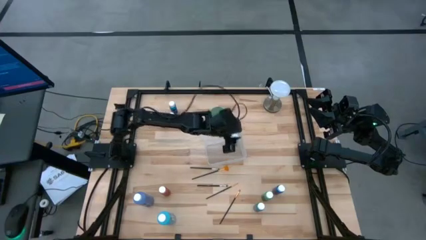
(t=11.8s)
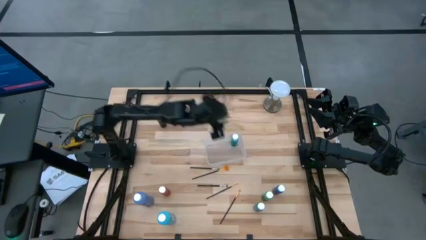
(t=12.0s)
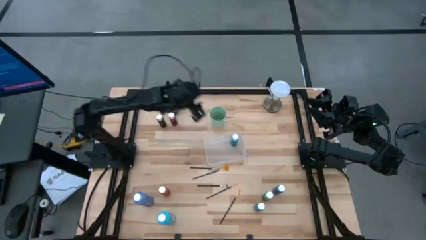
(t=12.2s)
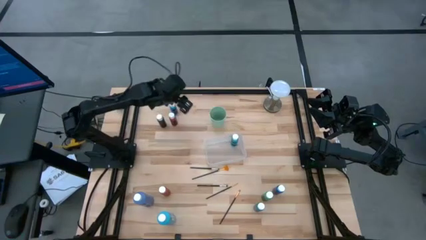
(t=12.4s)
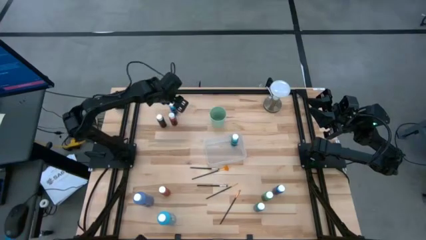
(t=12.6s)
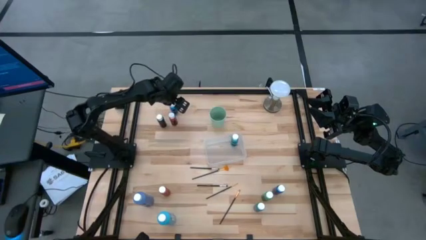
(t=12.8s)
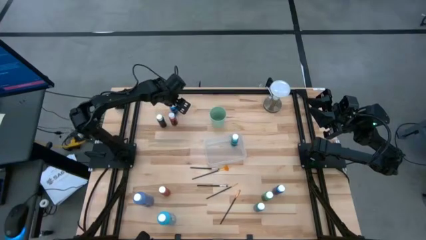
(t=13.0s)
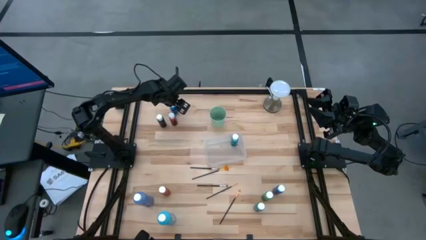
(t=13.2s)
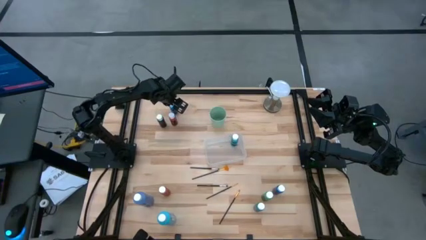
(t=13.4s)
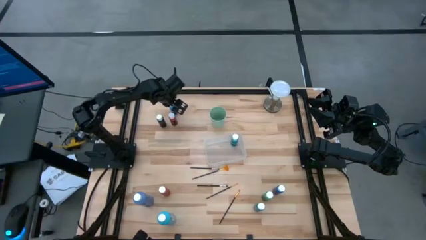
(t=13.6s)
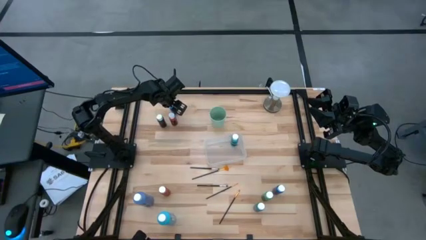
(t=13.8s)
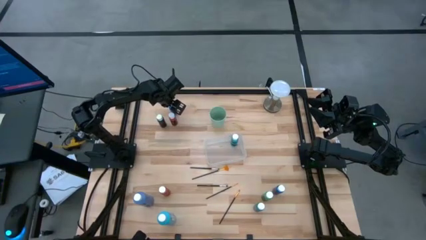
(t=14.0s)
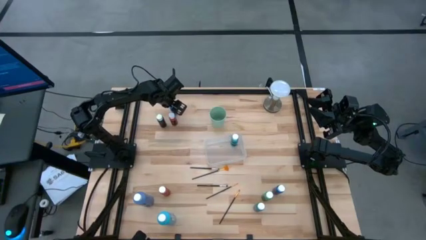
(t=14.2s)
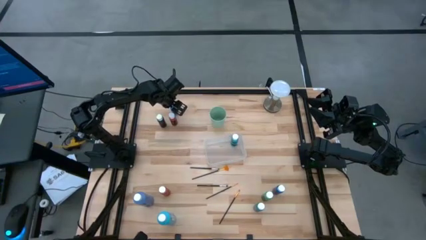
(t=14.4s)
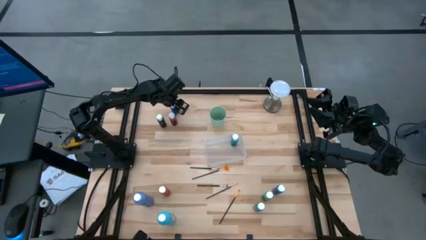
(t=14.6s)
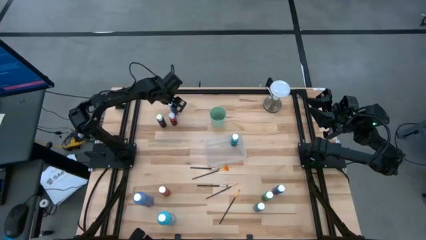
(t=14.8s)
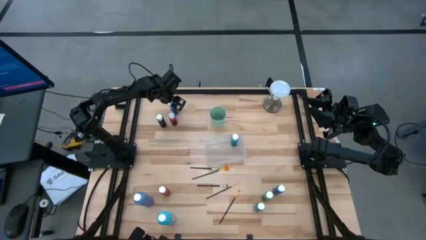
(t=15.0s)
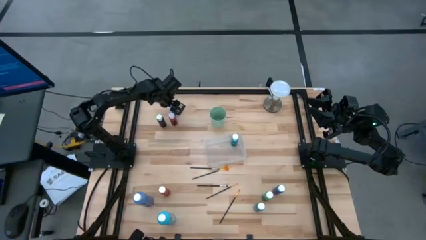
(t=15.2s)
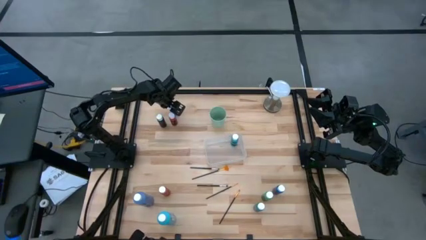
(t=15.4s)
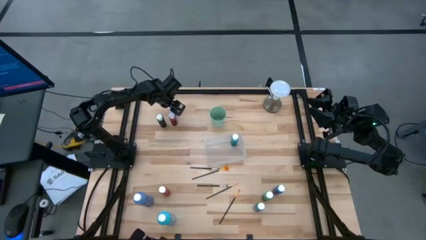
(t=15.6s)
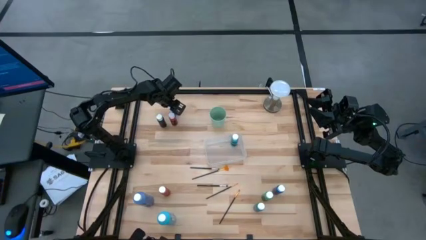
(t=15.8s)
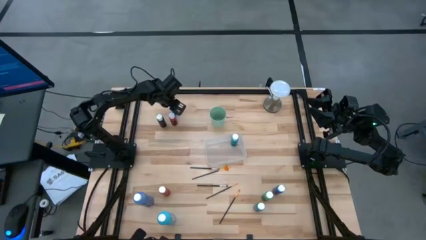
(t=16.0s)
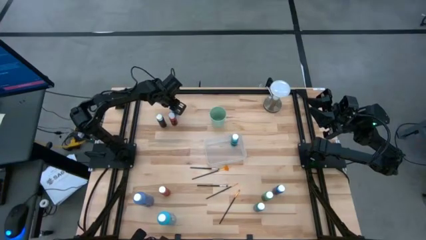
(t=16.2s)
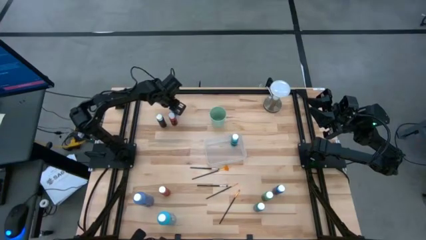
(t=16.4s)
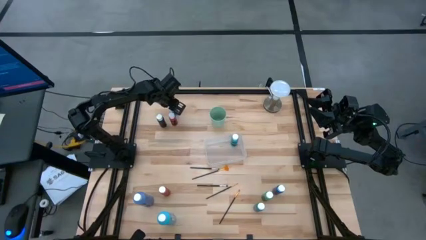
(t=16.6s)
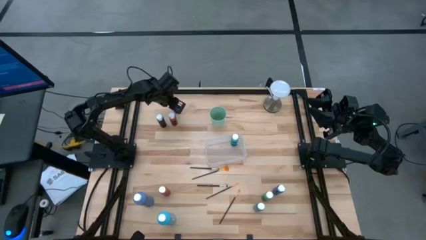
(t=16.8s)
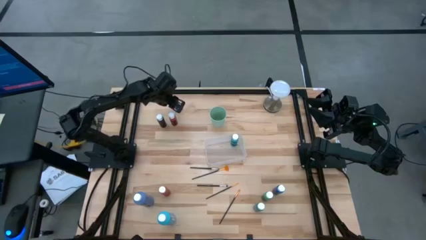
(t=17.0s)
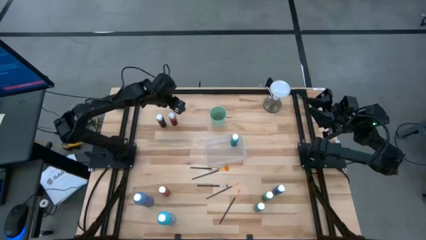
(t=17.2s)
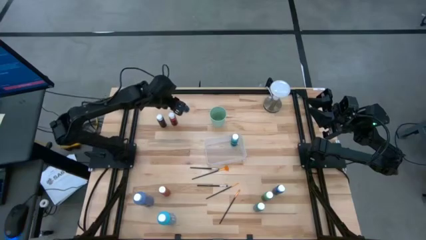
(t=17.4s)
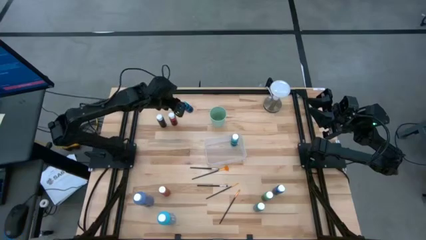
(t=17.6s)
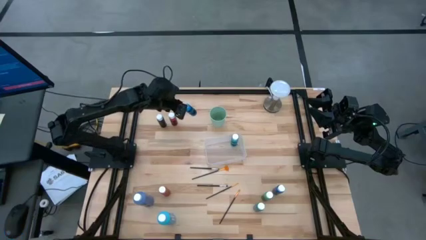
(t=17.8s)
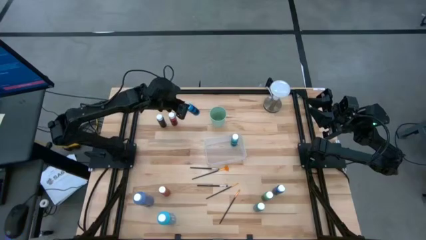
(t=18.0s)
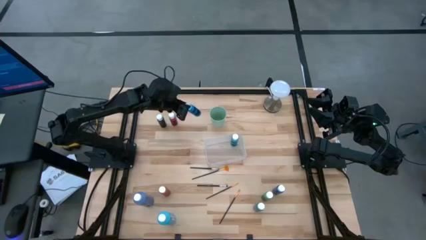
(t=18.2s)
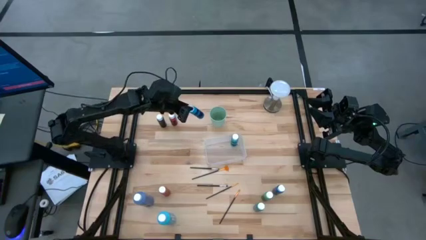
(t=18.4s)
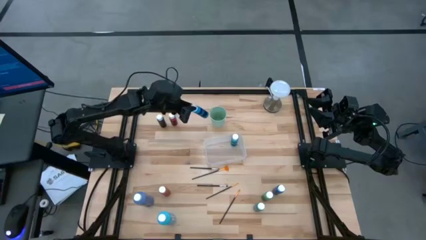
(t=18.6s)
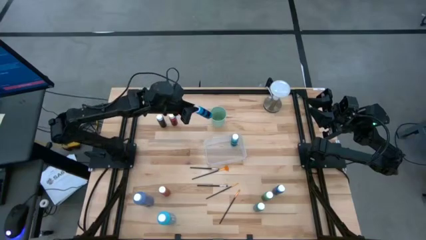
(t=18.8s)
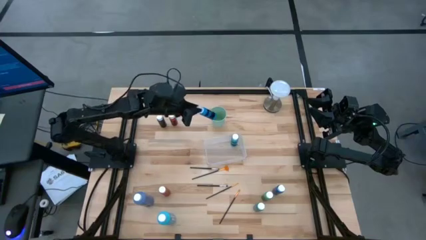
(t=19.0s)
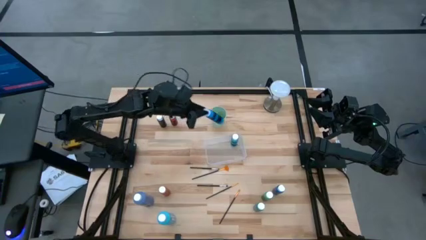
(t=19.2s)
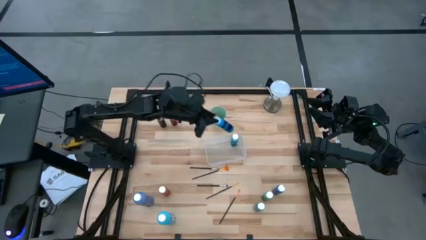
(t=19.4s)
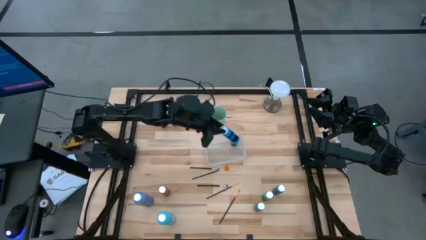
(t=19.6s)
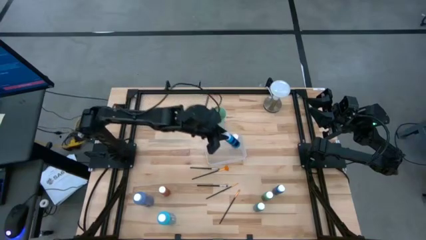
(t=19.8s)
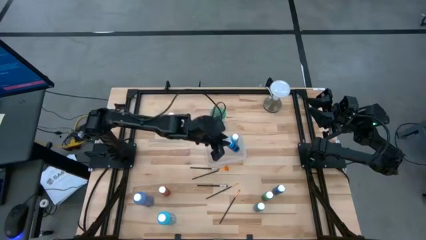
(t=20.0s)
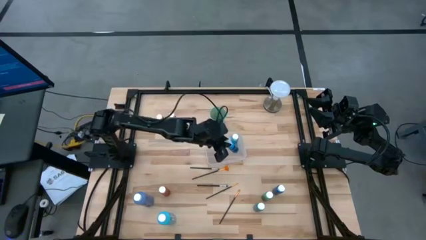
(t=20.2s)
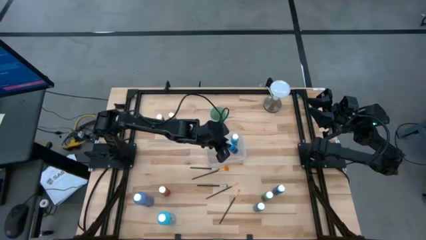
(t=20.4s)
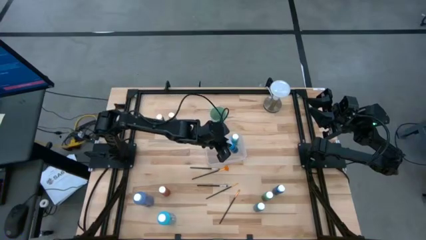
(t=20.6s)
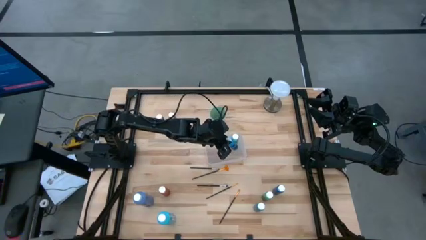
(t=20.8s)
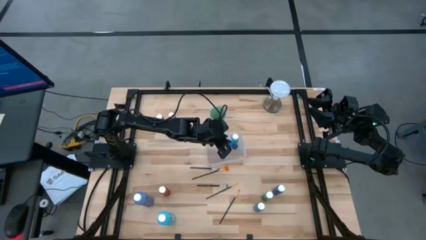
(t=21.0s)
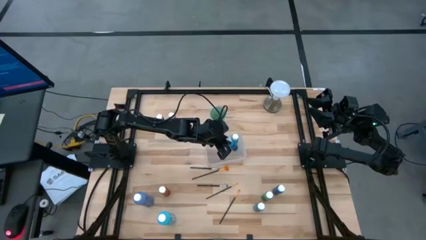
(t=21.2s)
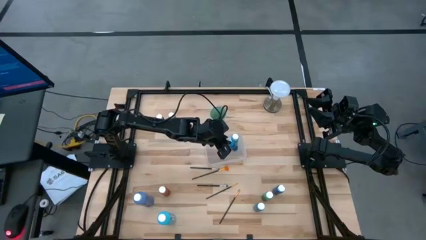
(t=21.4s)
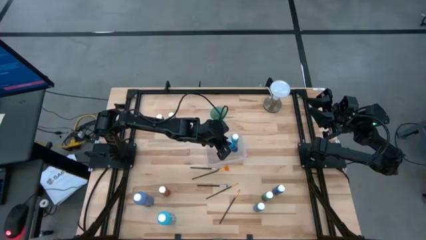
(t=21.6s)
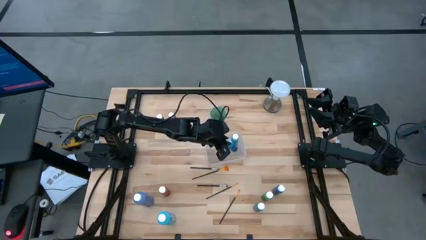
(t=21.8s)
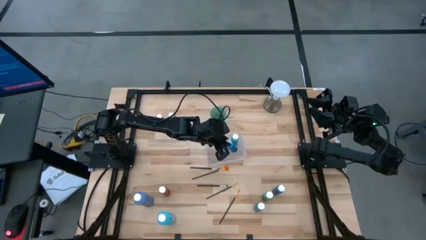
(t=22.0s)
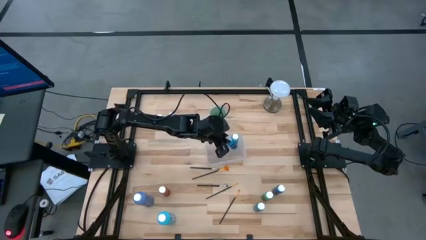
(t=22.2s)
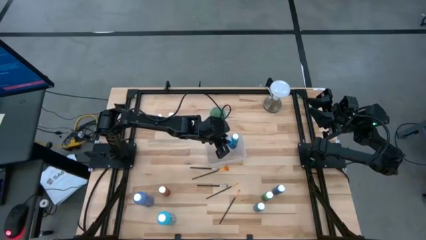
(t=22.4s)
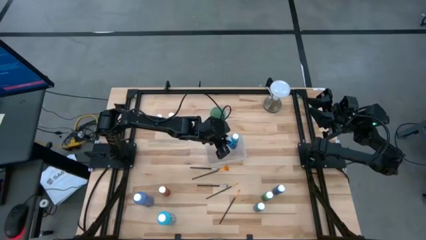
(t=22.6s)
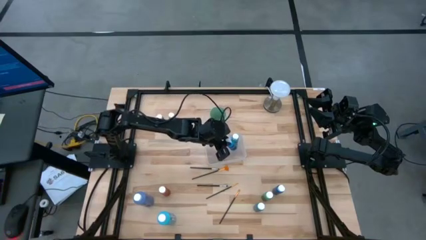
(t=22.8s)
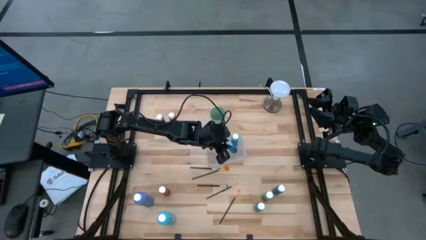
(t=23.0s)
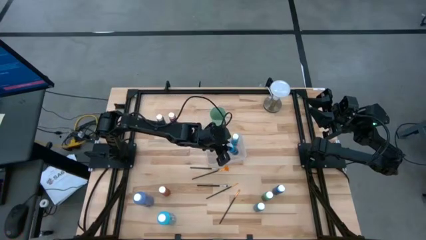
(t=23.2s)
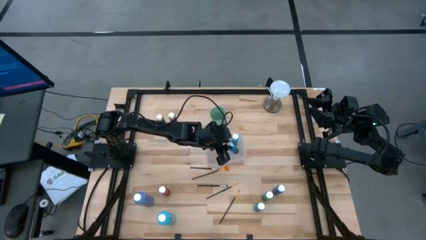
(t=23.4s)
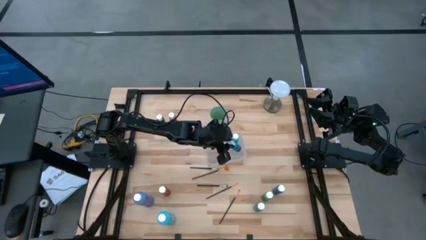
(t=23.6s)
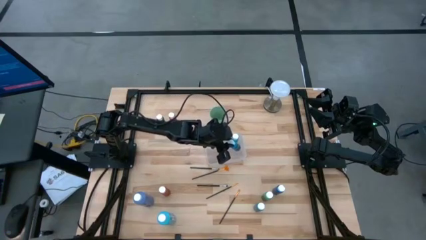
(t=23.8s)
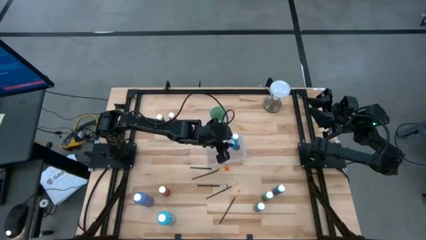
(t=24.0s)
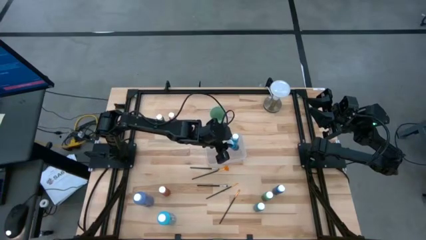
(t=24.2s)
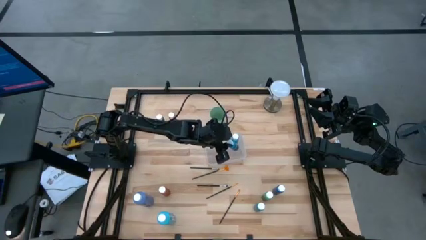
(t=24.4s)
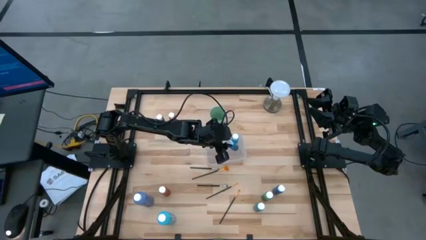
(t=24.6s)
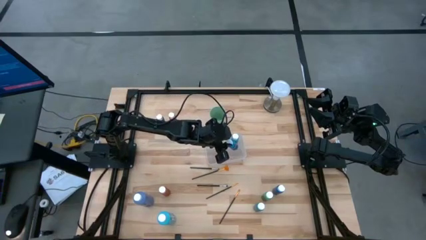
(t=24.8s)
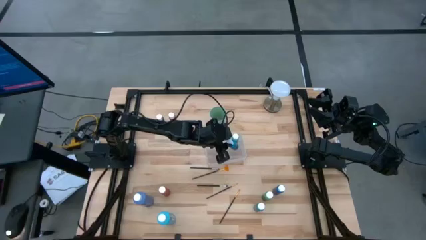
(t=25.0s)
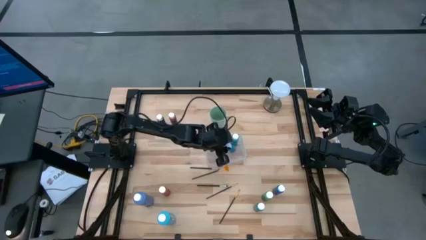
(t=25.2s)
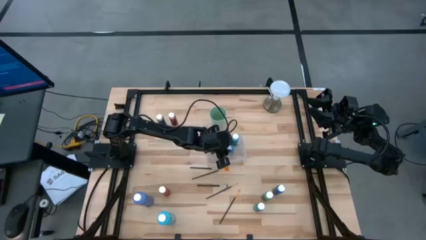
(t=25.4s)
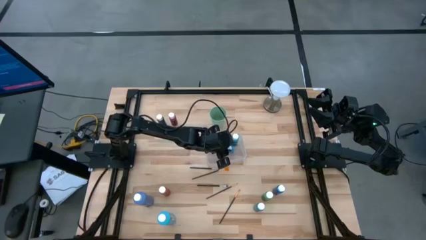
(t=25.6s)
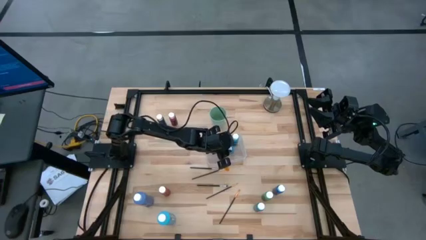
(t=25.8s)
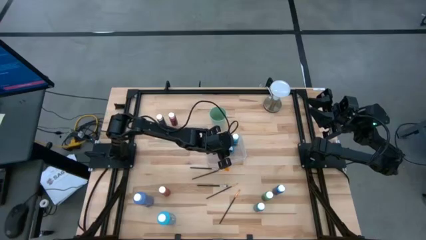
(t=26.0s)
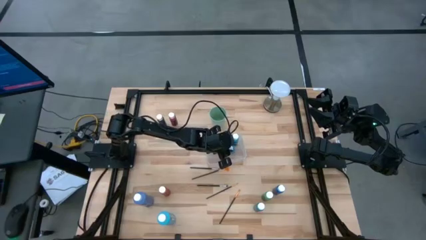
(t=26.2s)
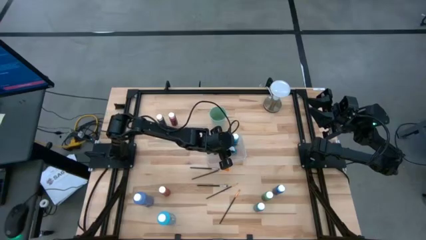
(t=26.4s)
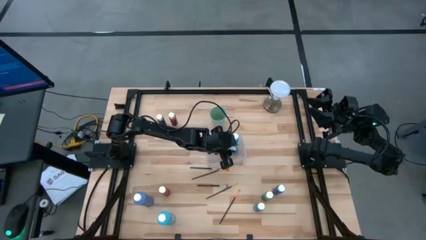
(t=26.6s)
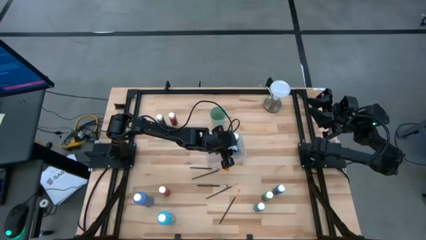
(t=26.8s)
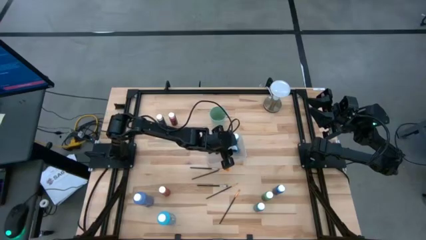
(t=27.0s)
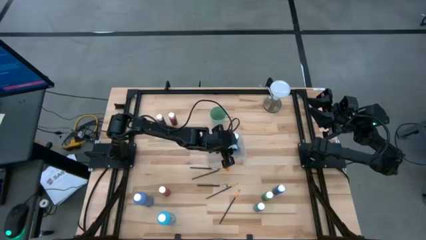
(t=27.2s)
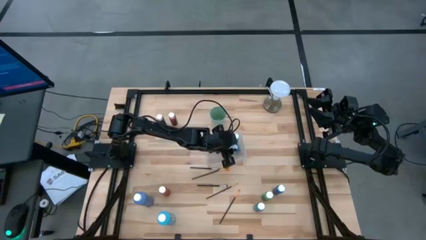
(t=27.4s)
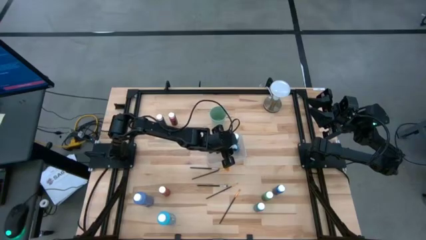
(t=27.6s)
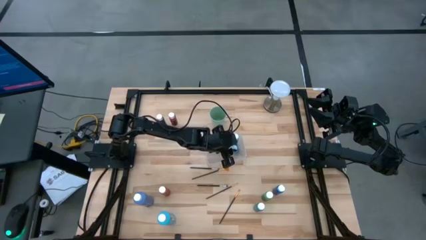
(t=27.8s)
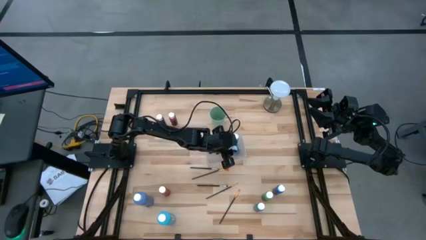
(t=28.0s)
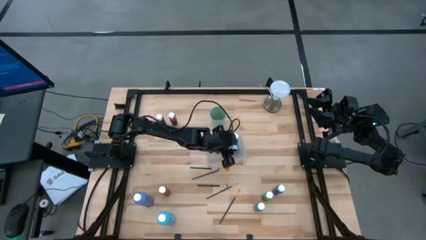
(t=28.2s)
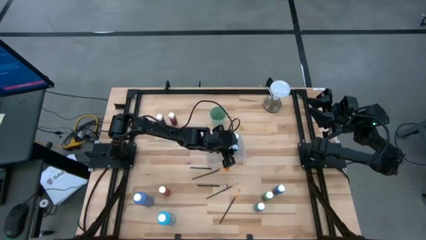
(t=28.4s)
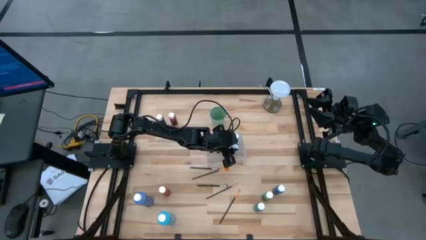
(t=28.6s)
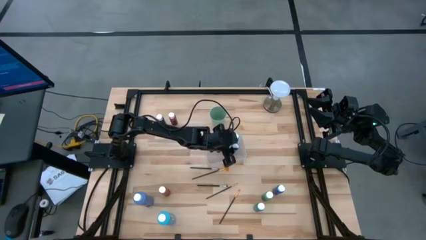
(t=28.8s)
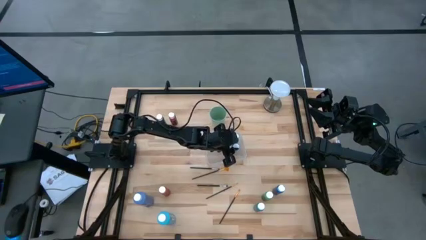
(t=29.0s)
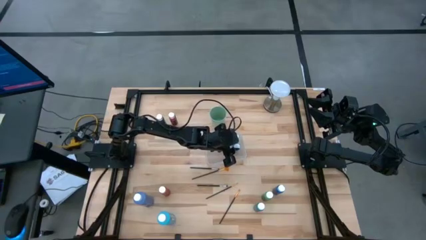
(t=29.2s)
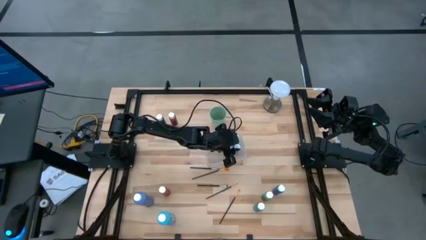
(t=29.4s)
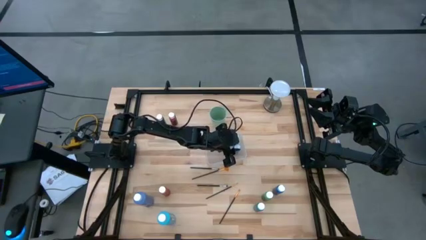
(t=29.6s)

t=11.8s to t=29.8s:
Task: Pick & Place Paint Supplies
Put the blue paint bottle into the transparent bin
